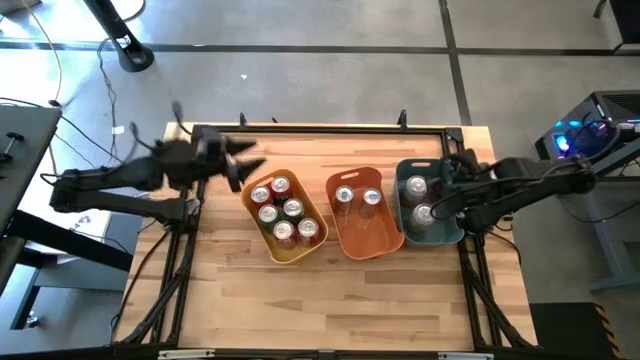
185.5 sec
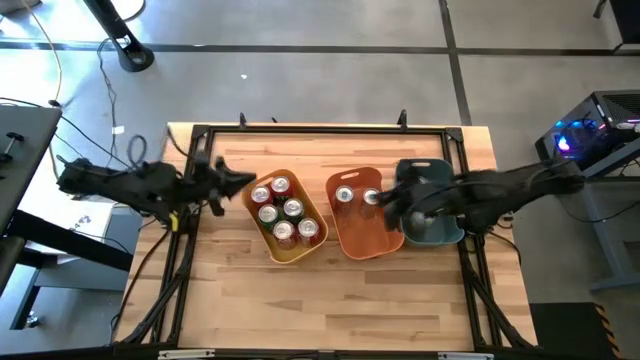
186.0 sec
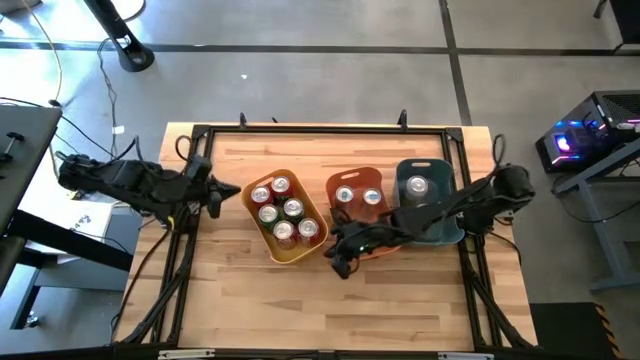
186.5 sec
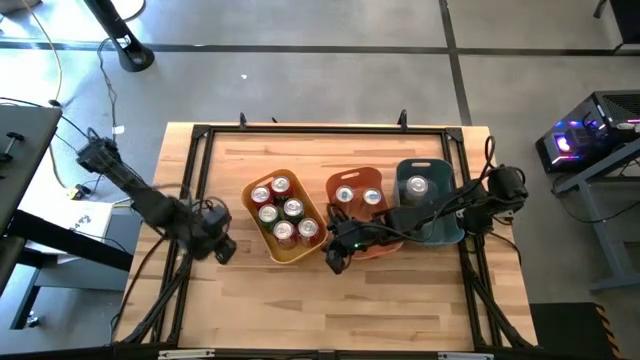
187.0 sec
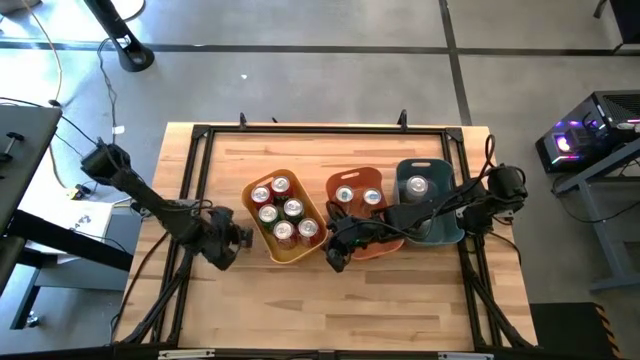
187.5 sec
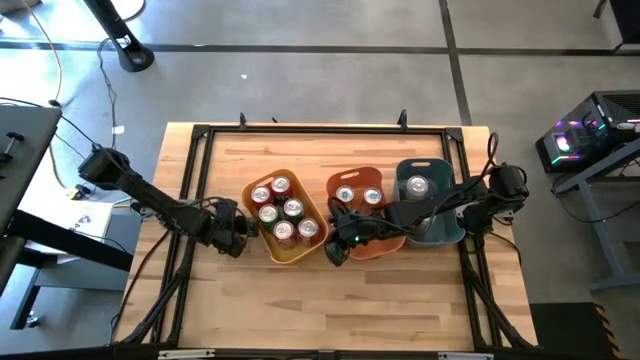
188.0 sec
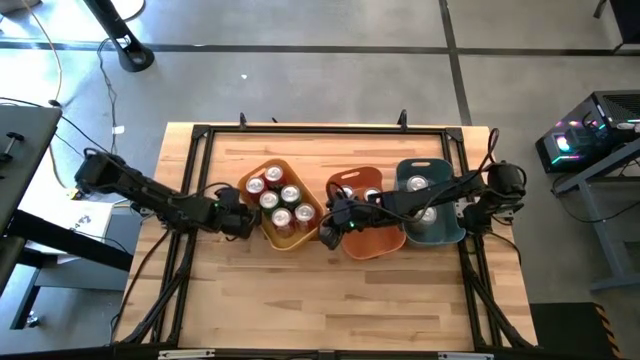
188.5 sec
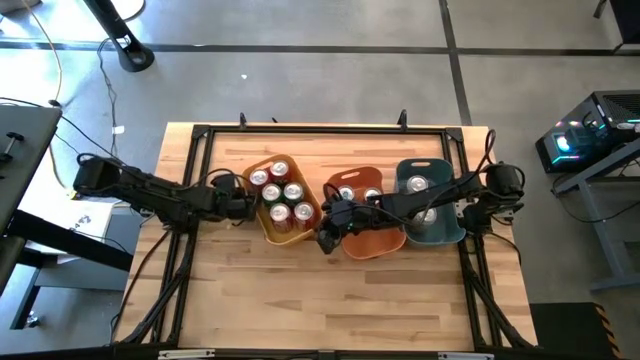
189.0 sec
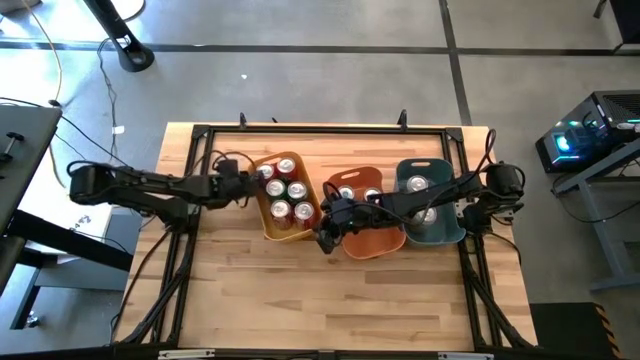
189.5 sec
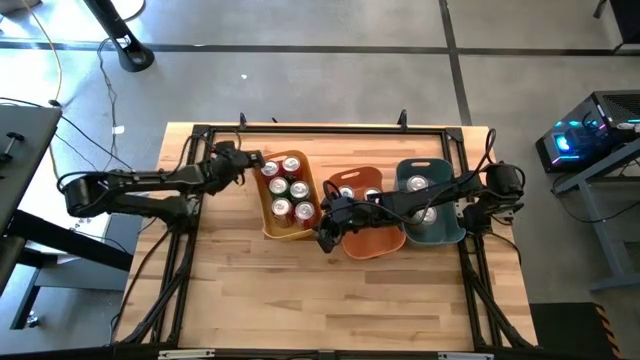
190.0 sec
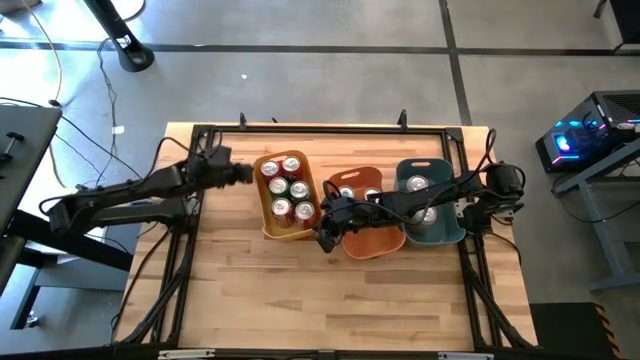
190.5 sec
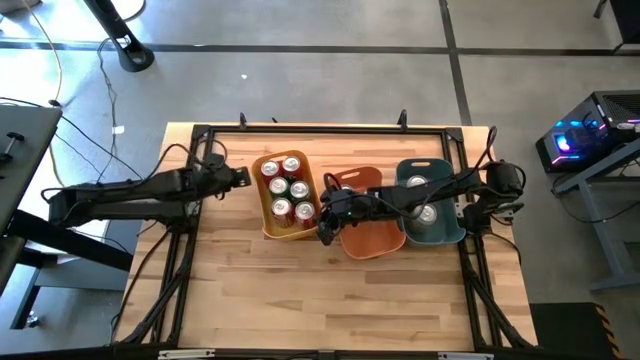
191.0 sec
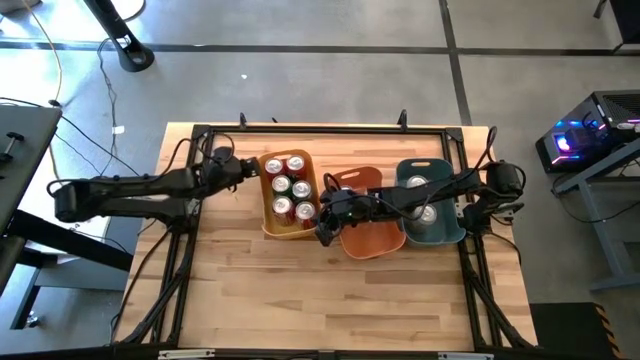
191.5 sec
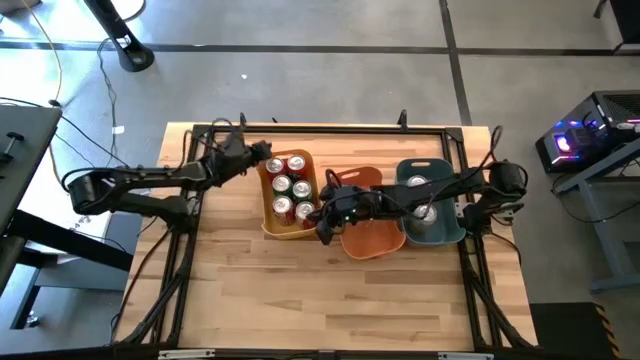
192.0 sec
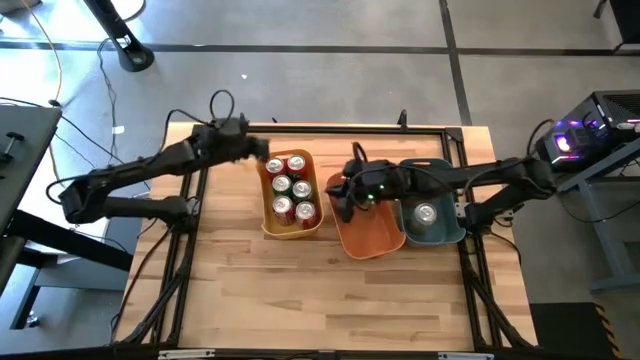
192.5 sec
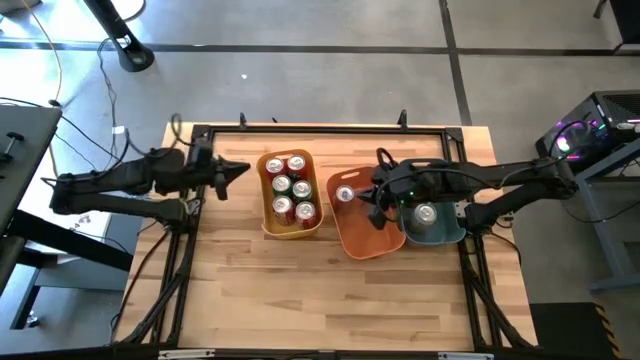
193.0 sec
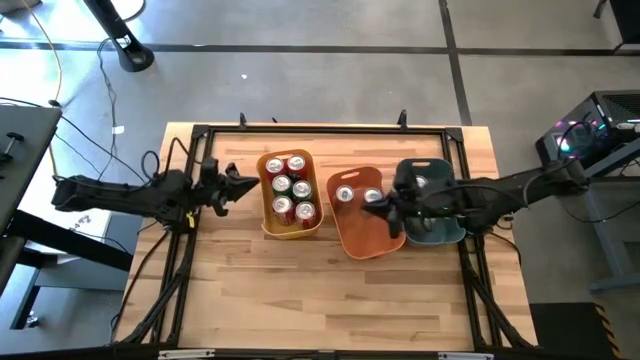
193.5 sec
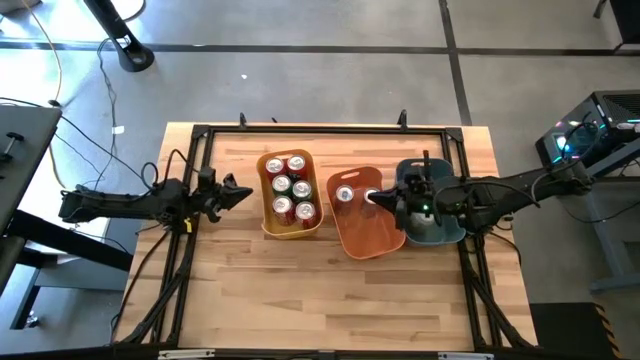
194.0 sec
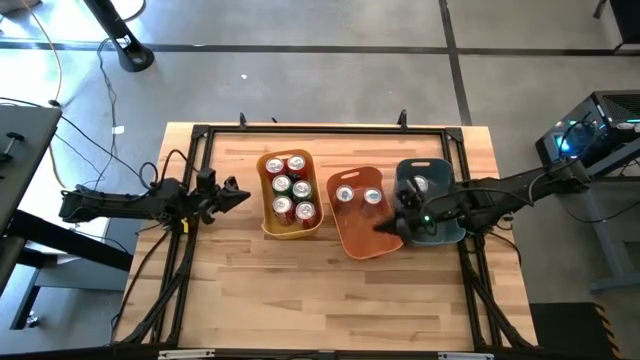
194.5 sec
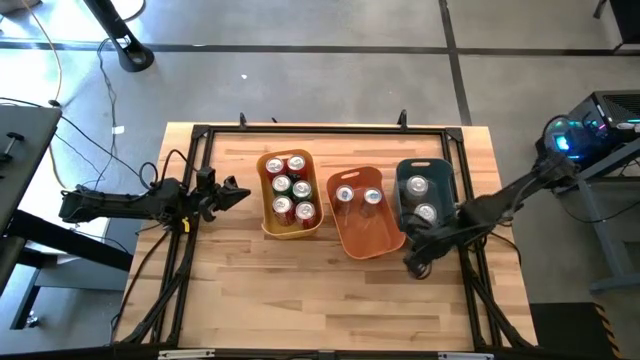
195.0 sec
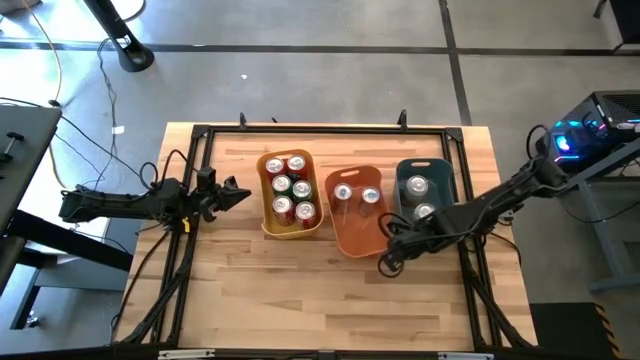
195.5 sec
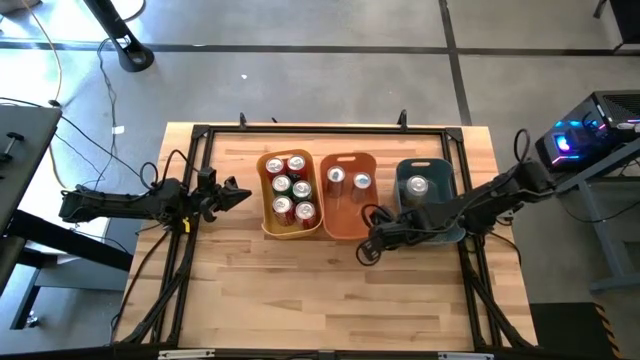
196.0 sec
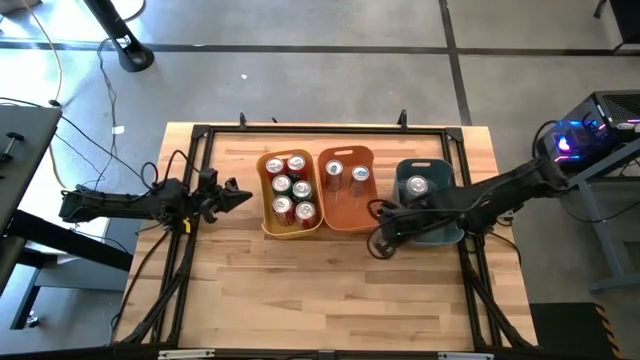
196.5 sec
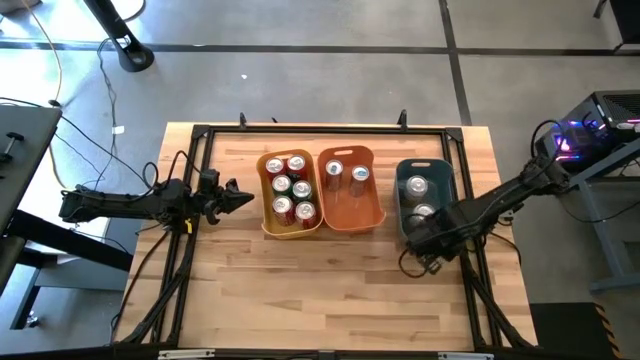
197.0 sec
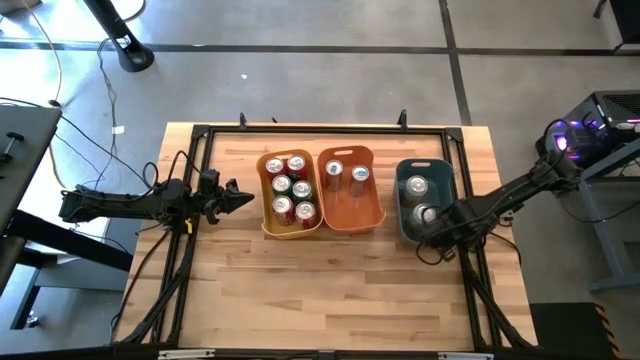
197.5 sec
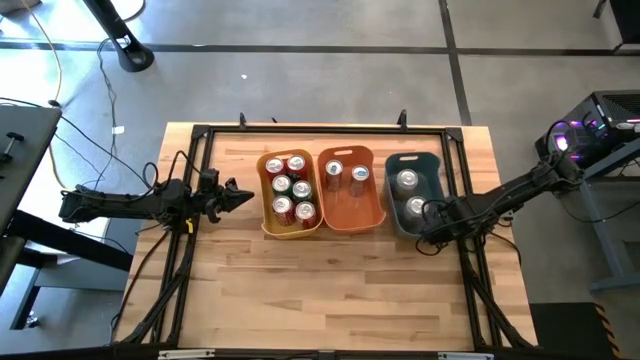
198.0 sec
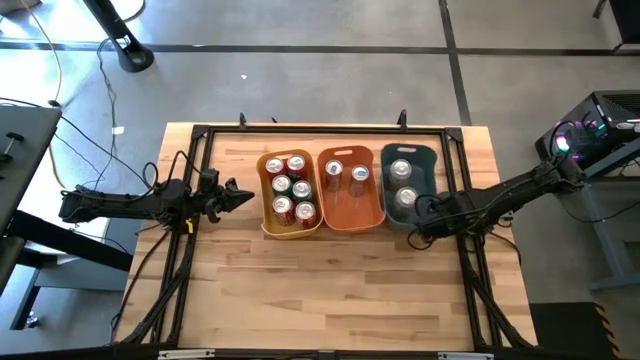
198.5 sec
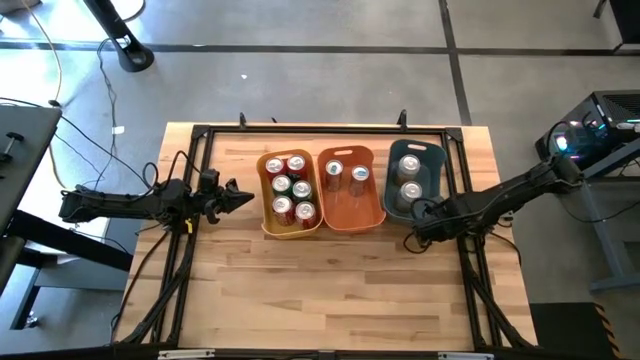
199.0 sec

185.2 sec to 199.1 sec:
Task: Sort soda cans
Adjust the bins

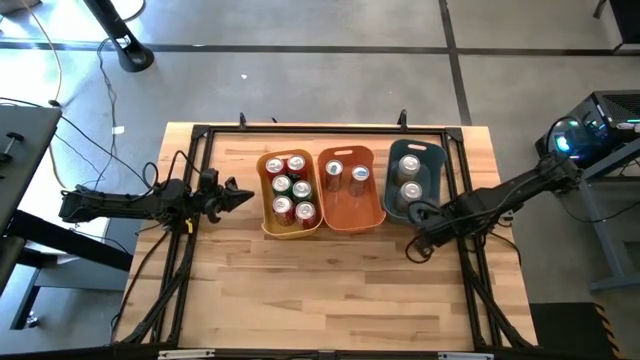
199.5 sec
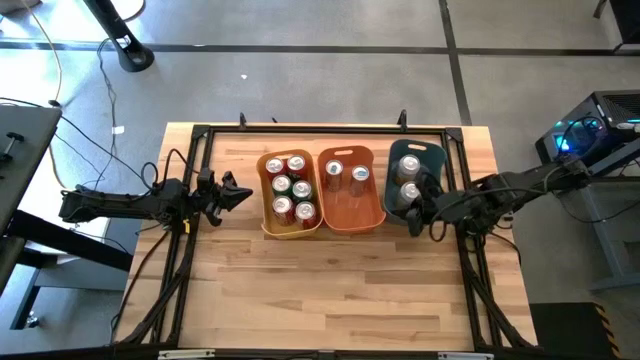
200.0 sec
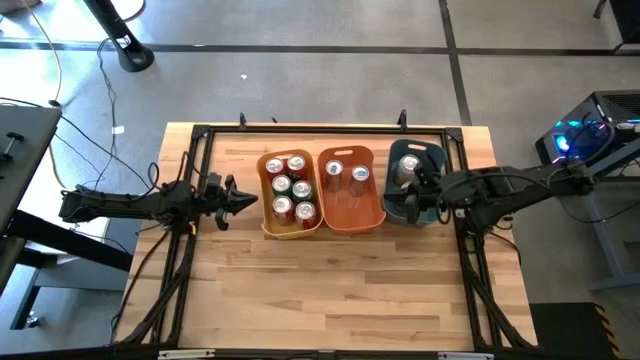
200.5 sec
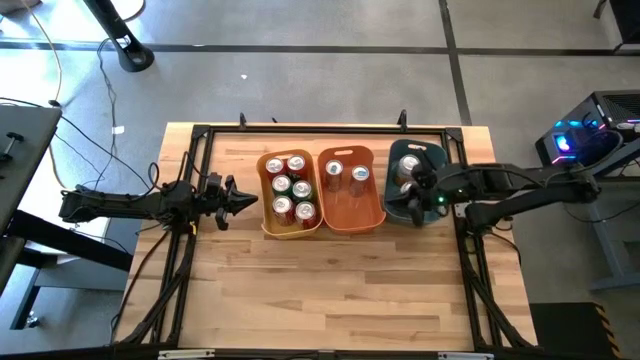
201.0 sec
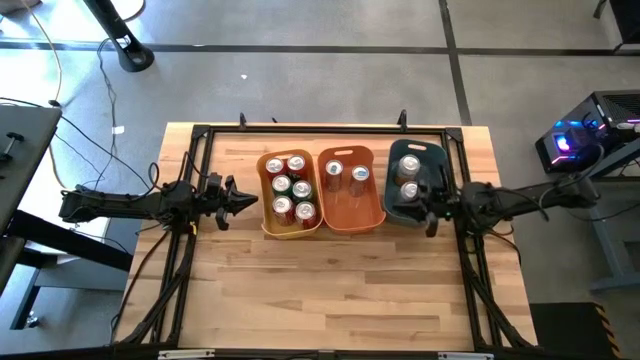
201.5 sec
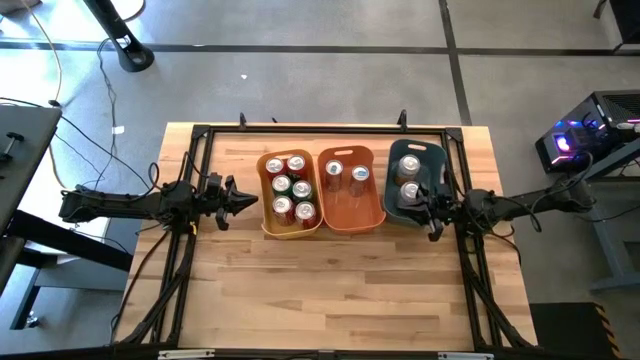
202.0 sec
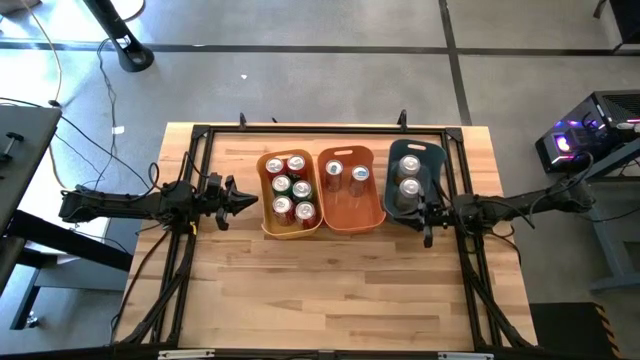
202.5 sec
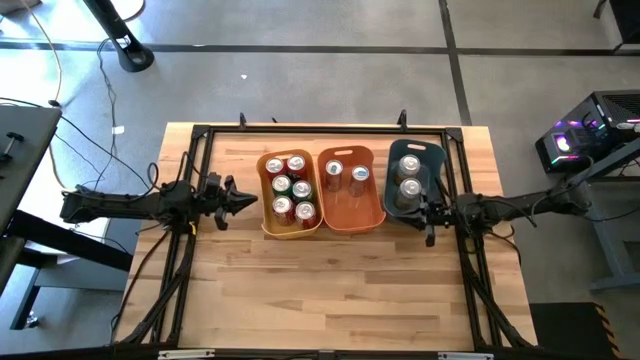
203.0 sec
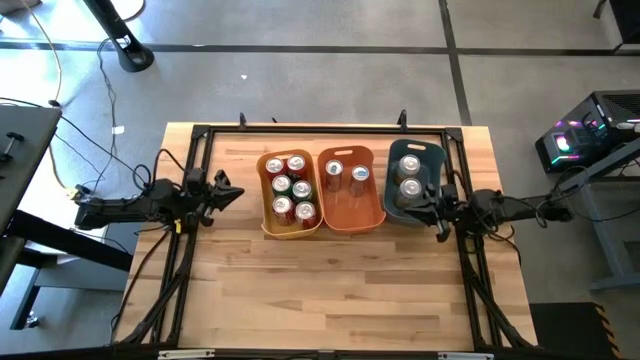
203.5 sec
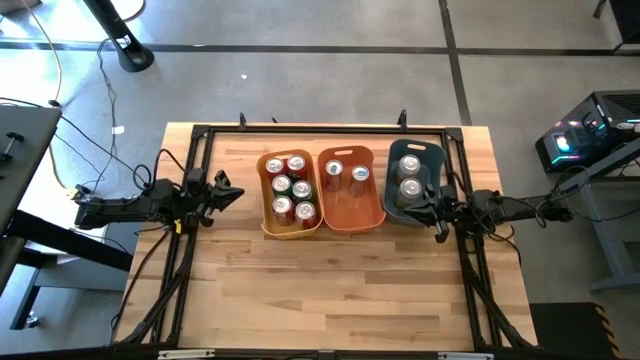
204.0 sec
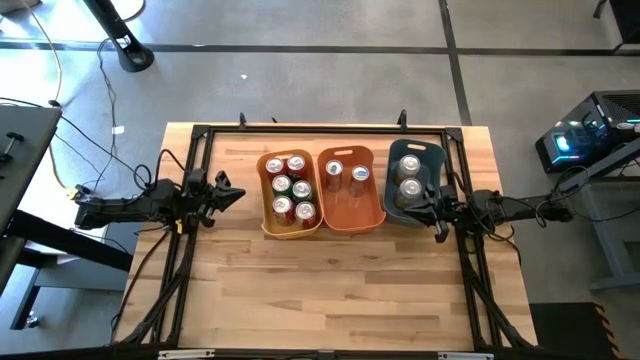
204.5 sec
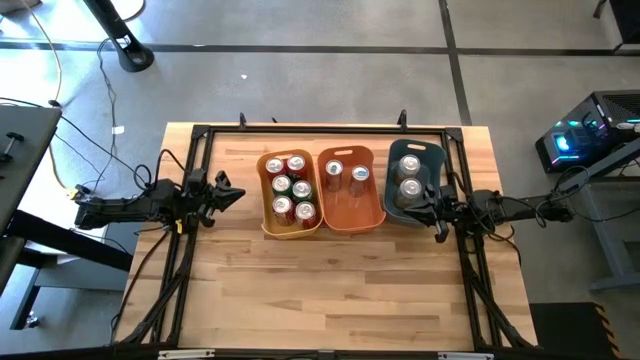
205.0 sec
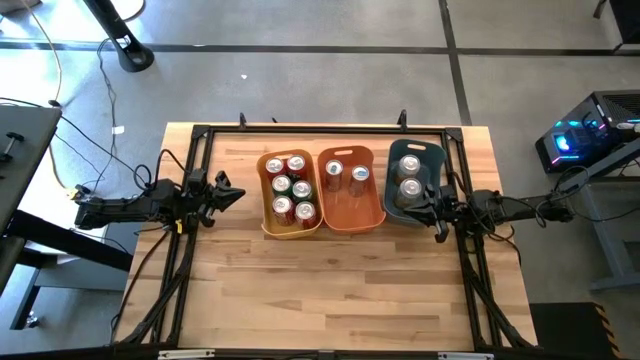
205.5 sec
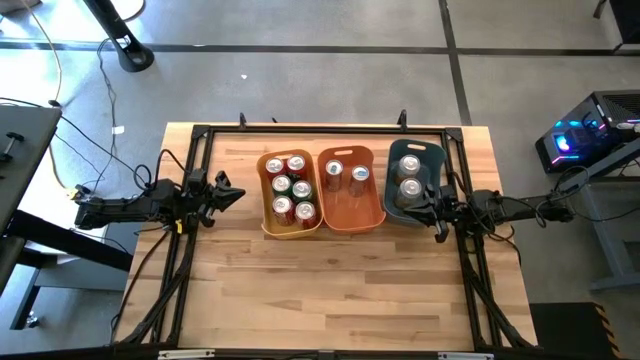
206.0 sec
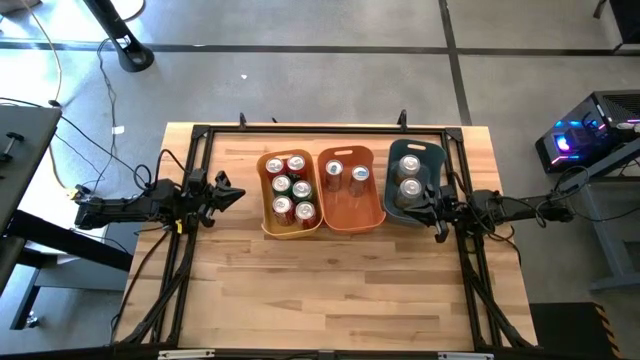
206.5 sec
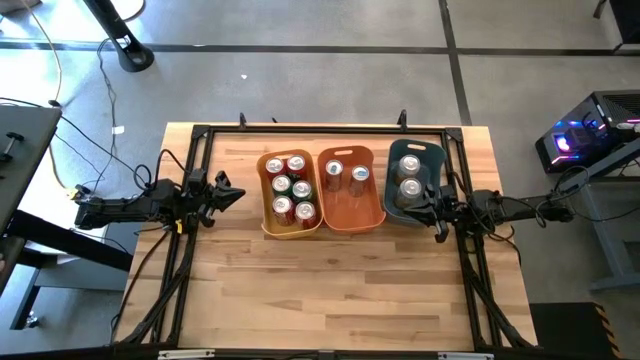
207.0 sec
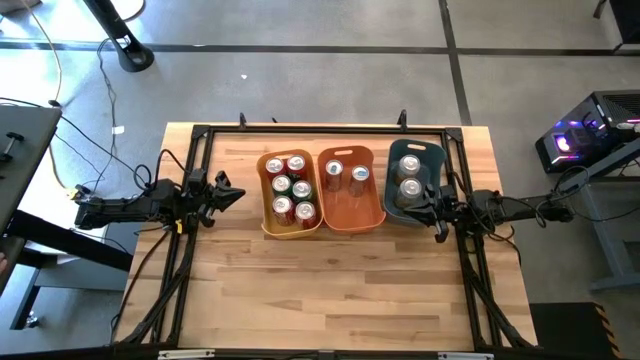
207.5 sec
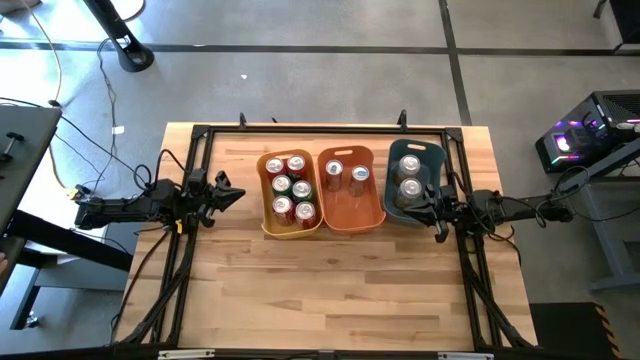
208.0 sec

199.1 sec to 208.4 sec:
Return to Home Position
